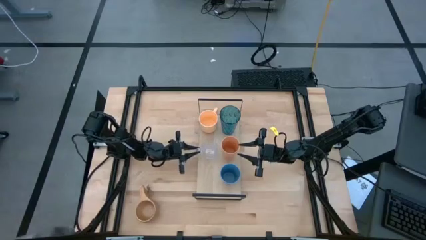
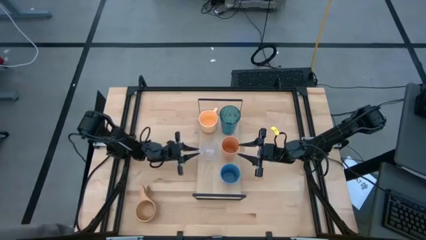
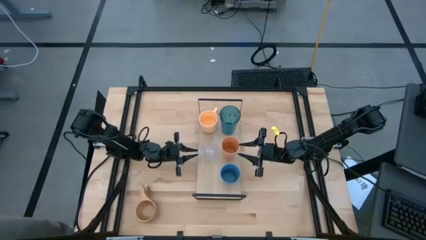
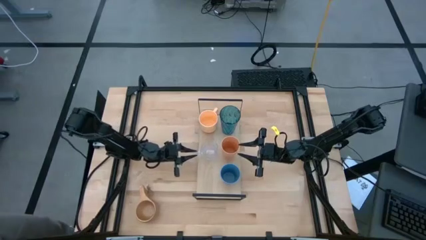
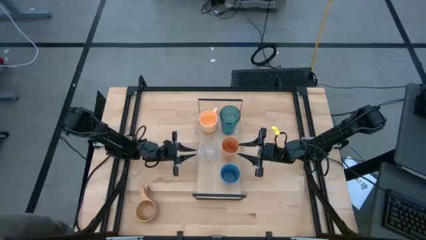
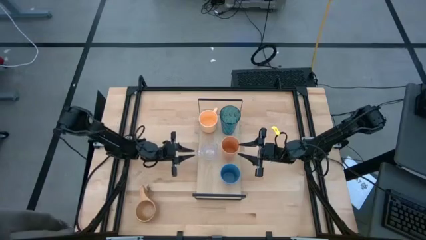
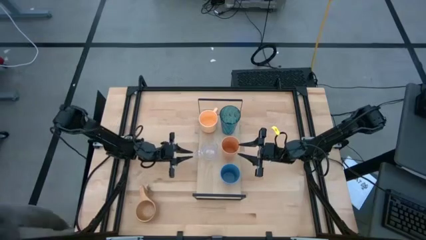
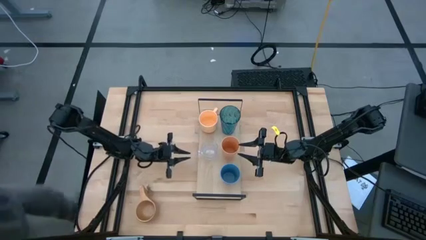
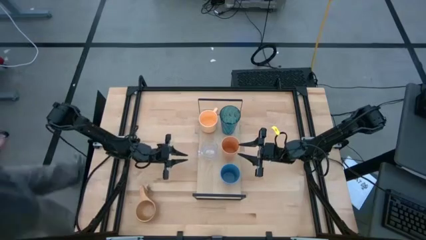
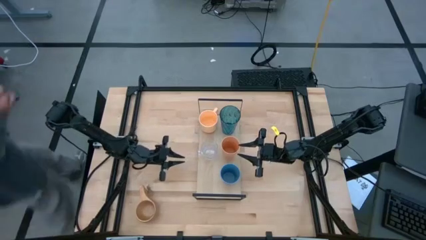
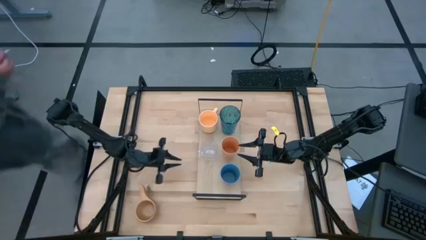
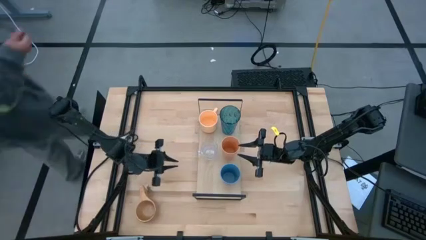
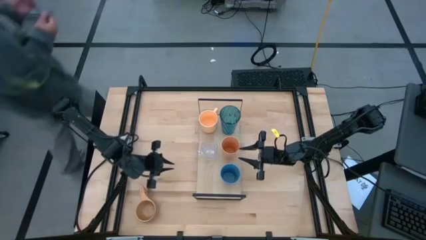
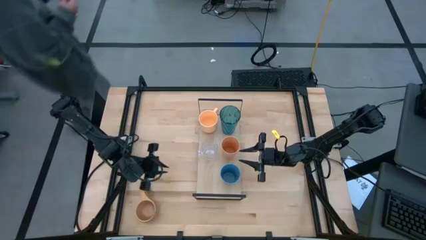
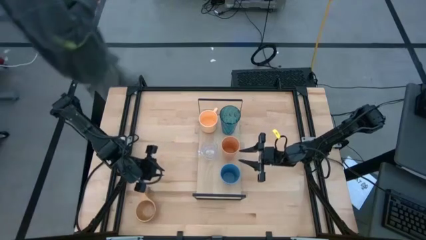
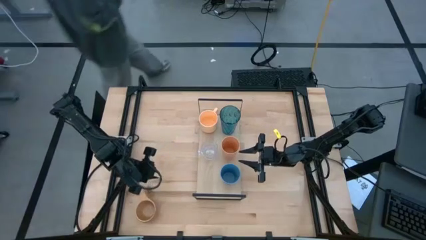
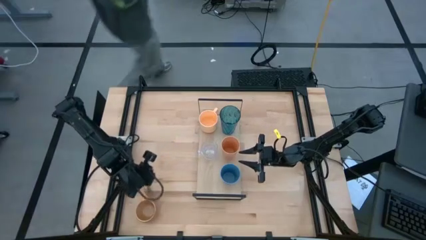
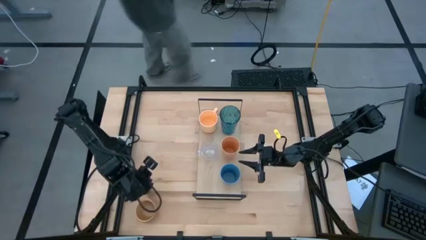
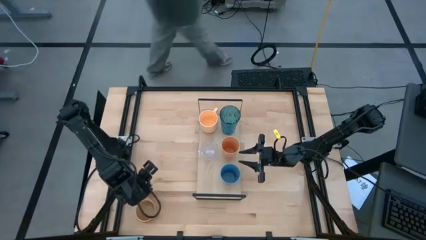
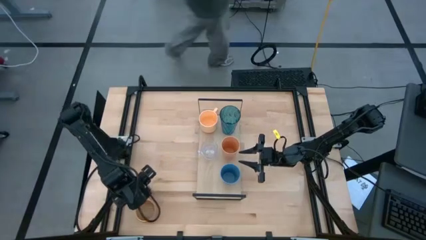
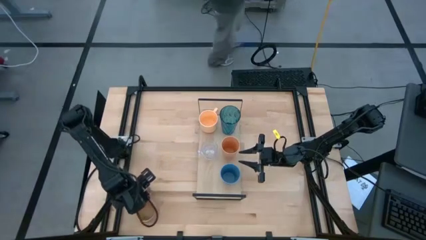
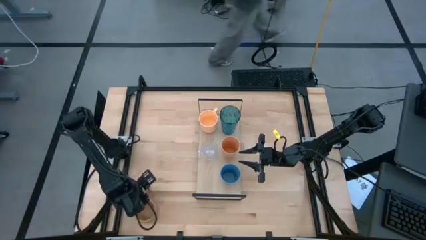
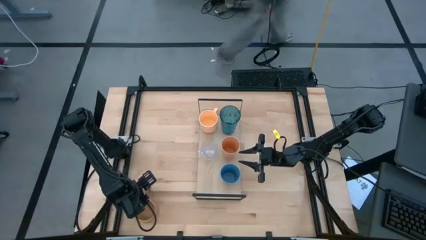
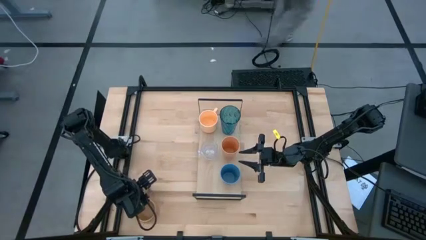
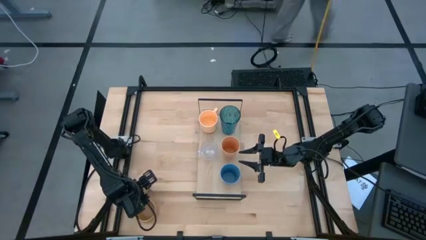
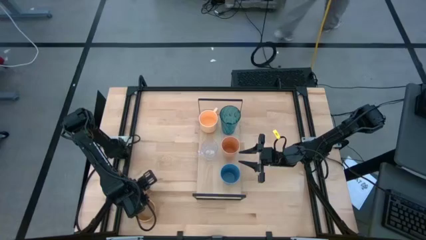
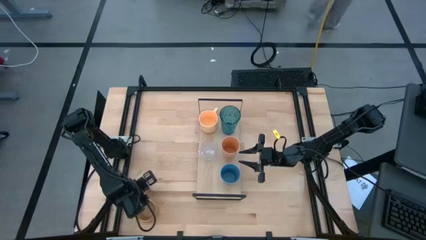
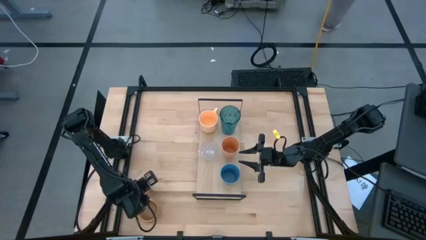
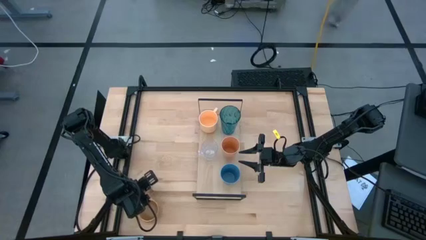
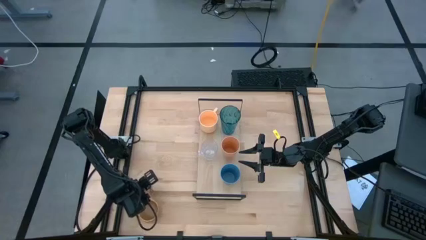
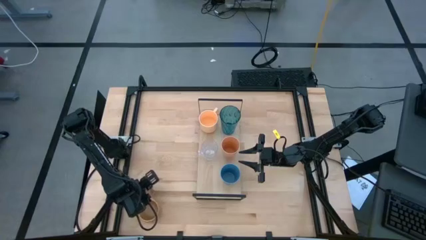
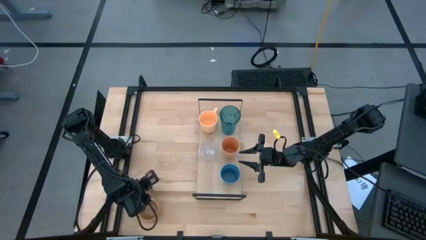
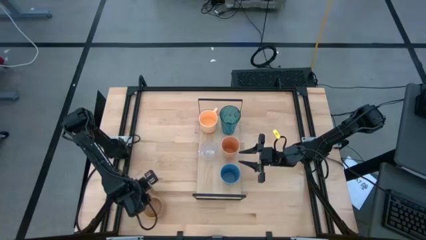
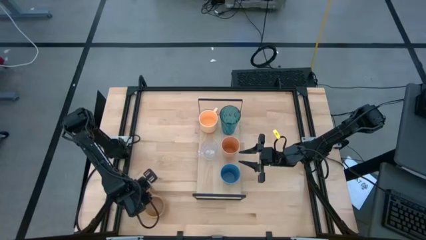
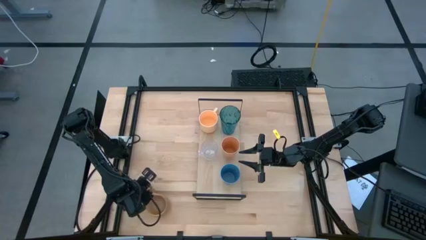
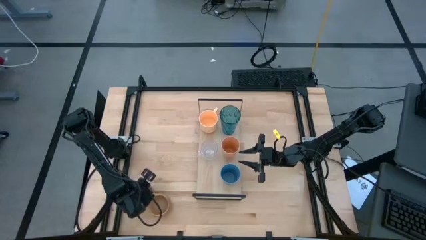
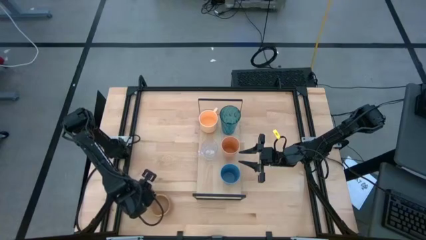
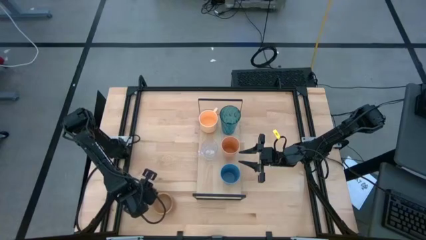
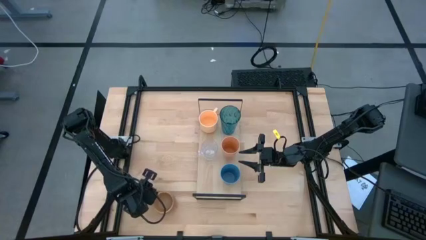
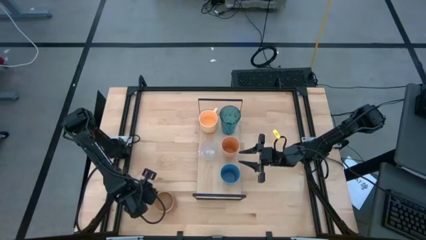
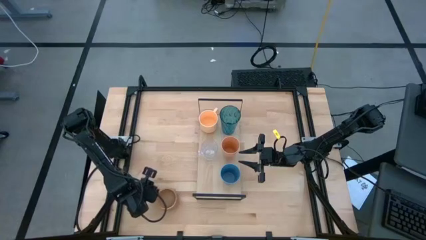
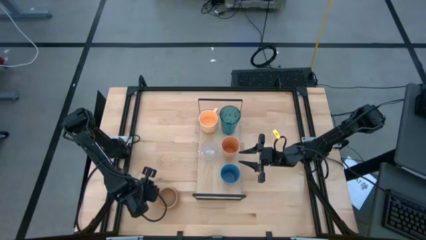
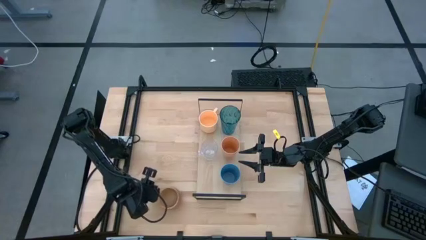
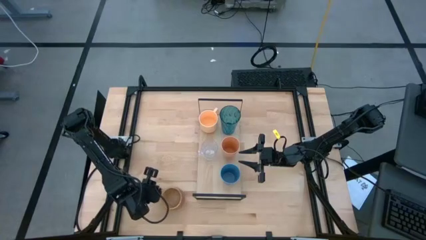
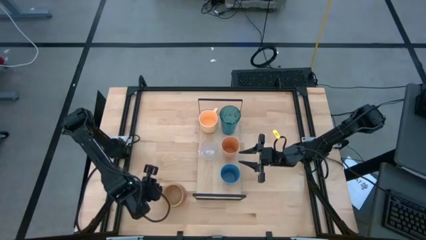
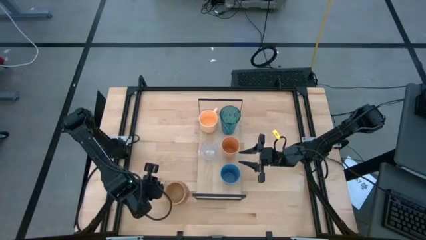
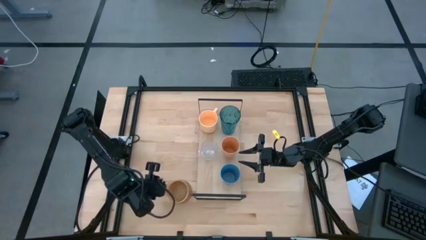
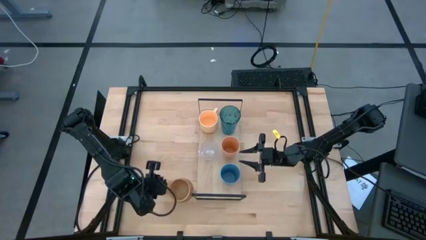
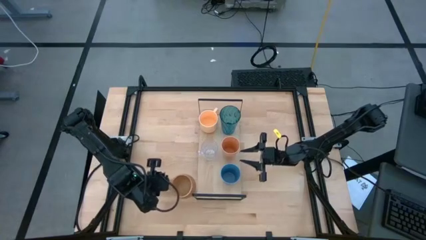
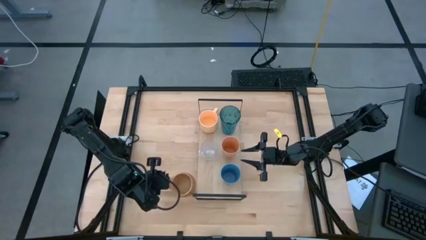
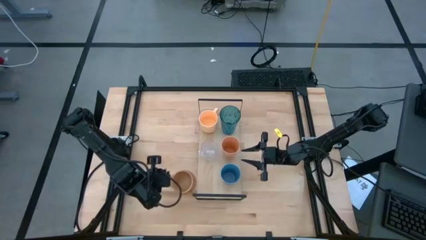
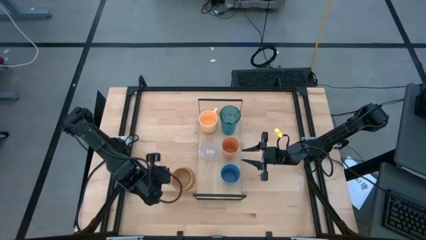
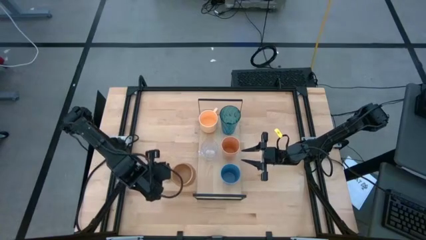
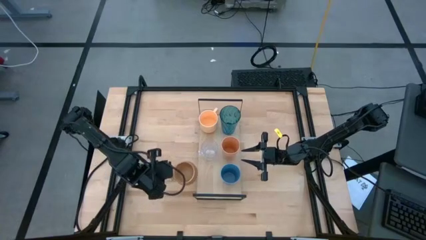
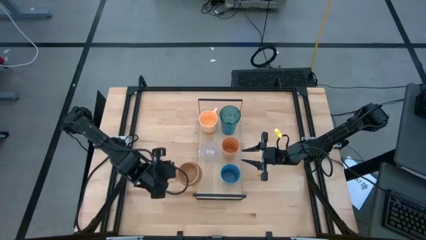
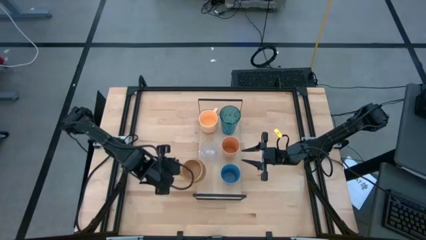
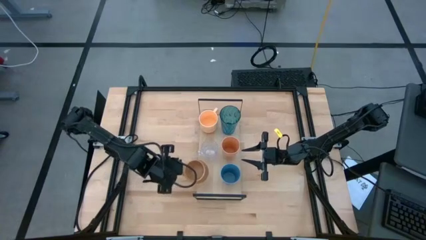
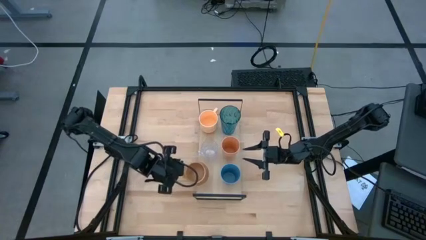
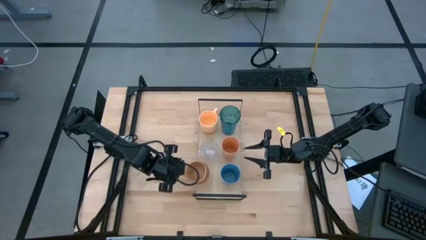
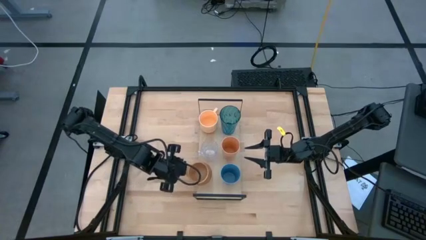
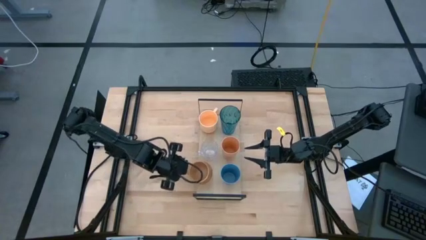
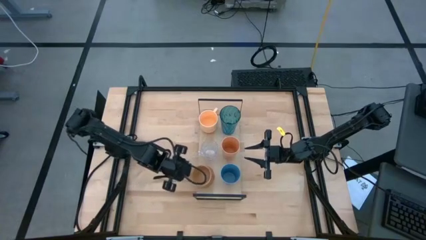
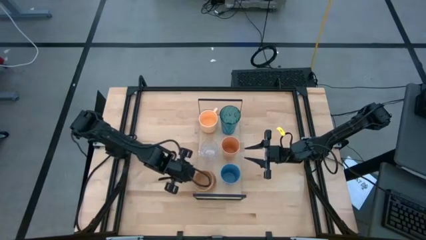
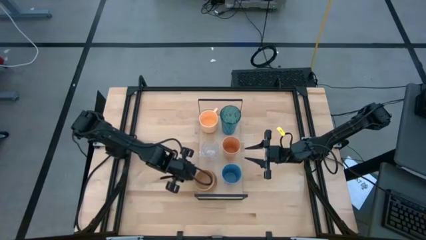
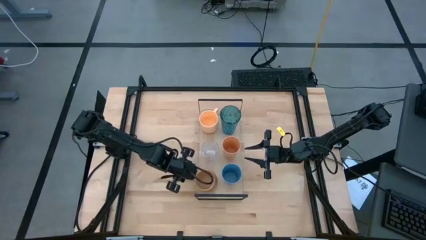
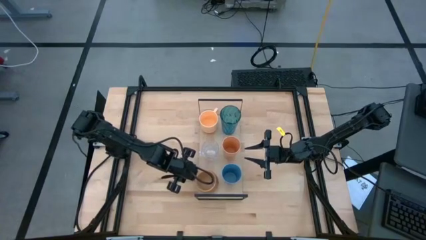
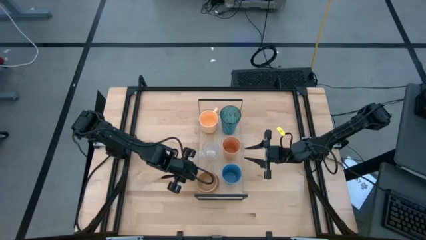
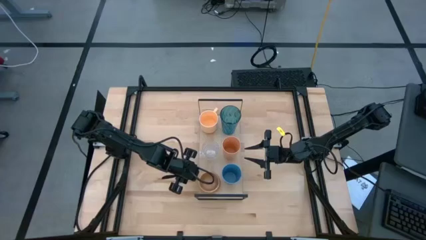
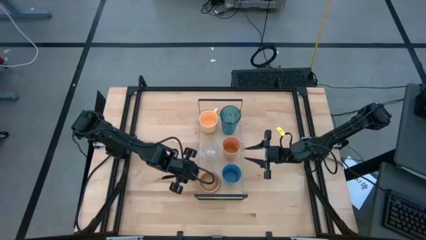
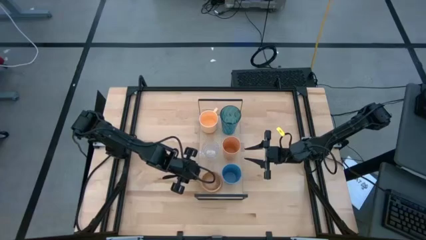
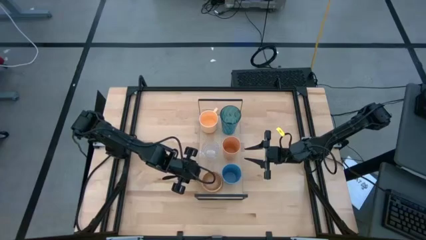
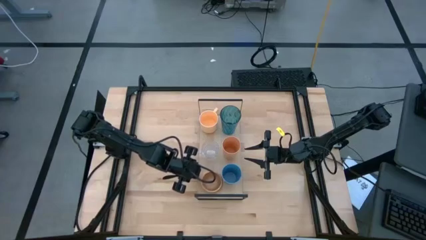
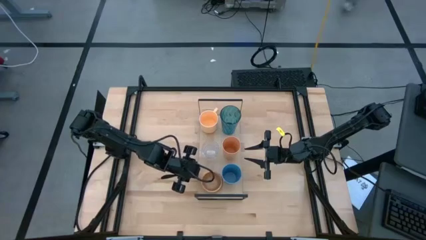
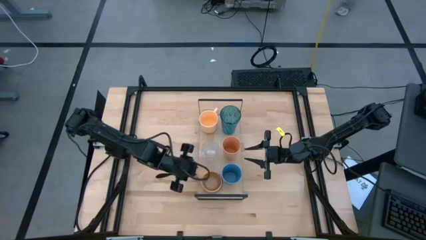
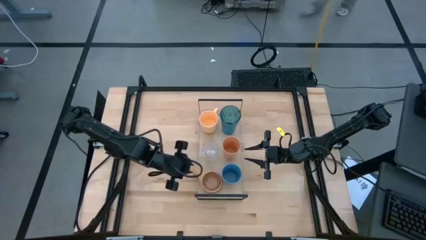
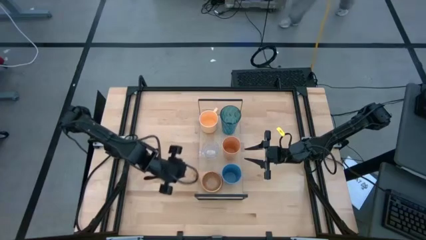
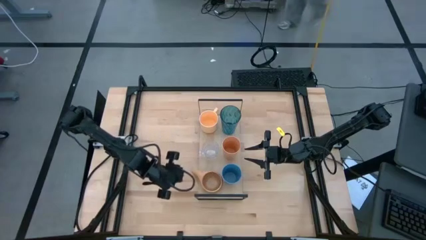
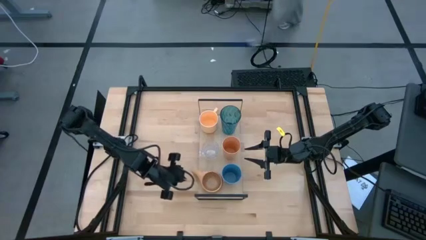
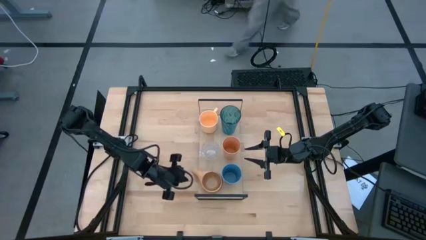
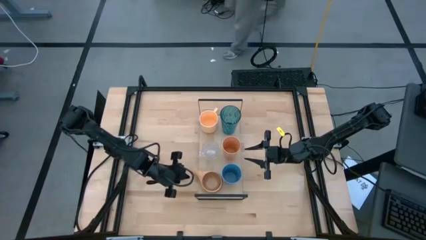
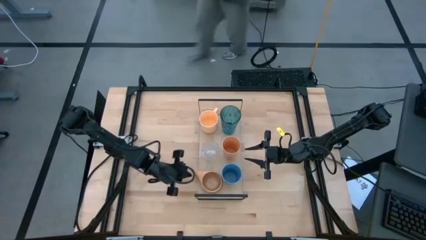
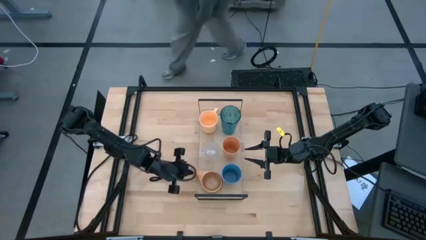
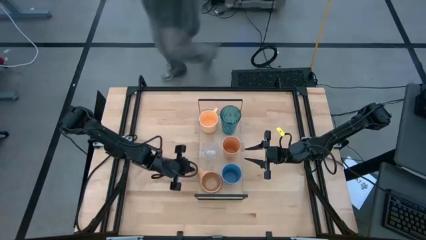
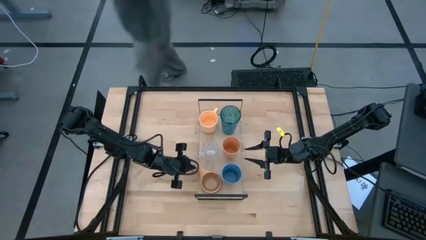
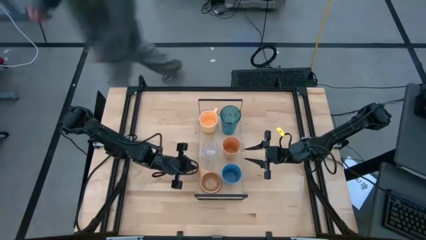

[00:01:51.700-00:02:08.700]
Task: Stack small to large cups/mugs on shelf
Put the wooden brown mug on the shelf
